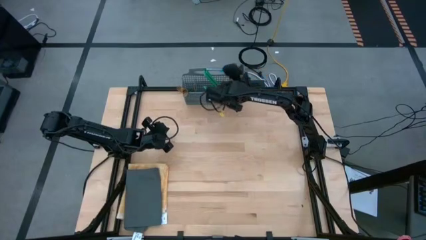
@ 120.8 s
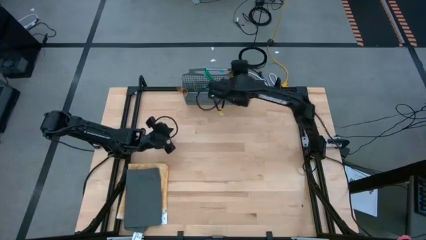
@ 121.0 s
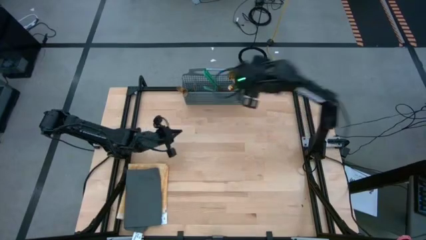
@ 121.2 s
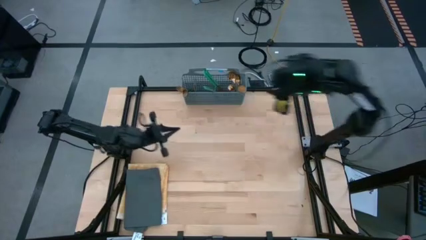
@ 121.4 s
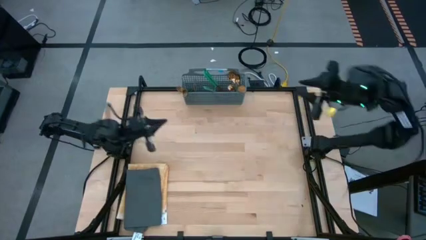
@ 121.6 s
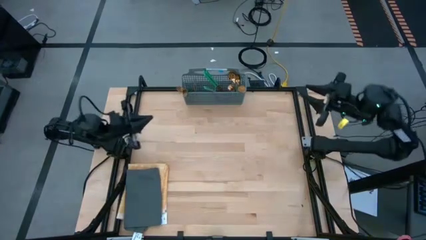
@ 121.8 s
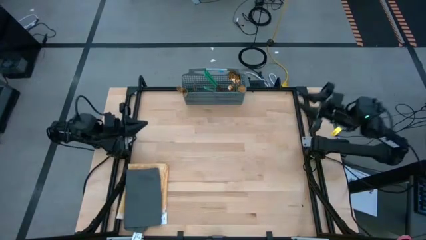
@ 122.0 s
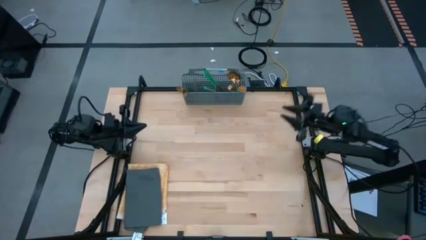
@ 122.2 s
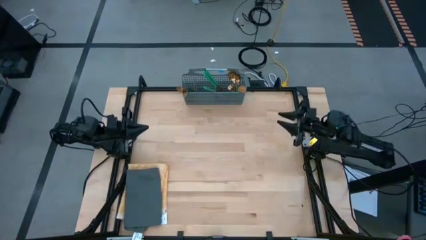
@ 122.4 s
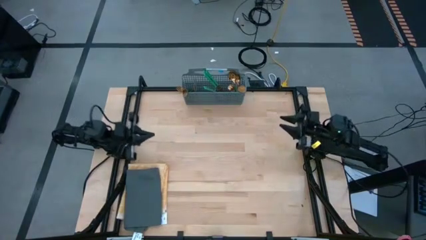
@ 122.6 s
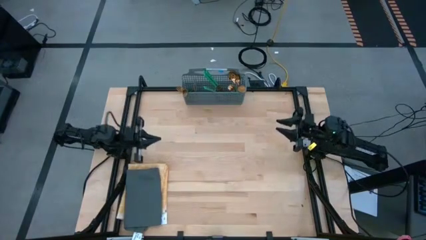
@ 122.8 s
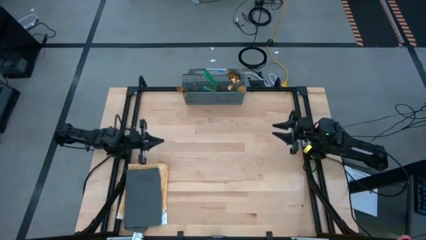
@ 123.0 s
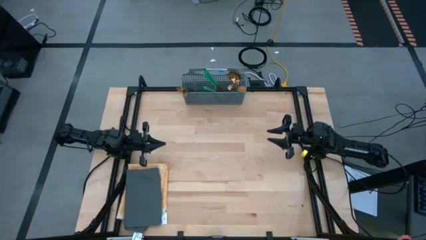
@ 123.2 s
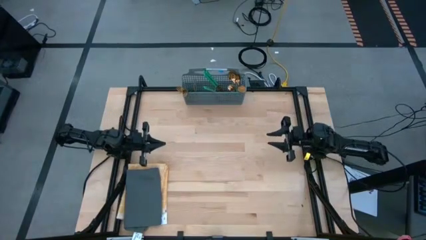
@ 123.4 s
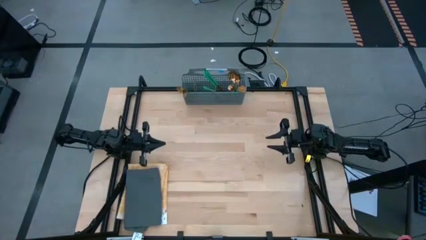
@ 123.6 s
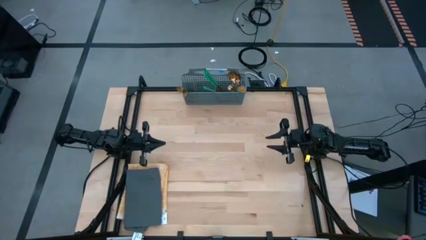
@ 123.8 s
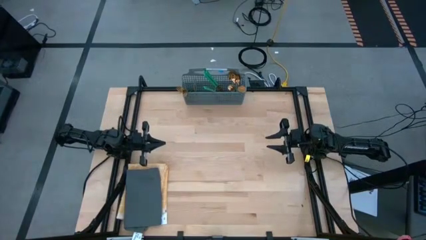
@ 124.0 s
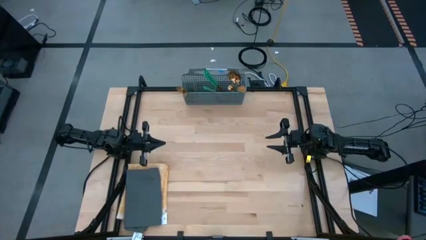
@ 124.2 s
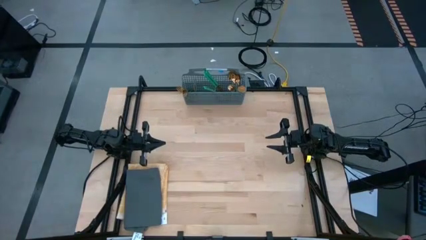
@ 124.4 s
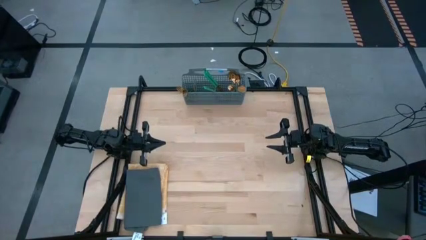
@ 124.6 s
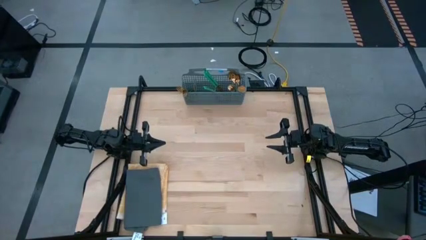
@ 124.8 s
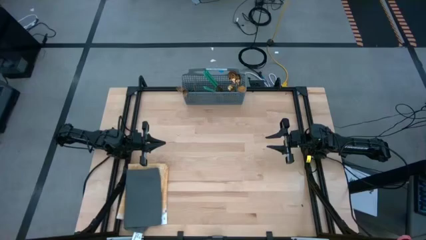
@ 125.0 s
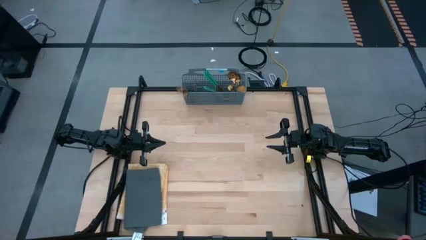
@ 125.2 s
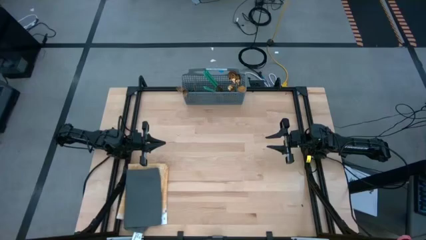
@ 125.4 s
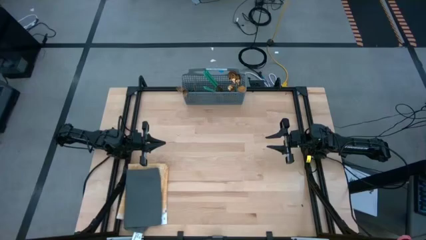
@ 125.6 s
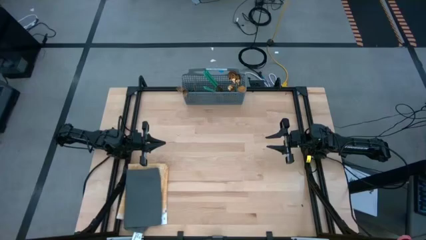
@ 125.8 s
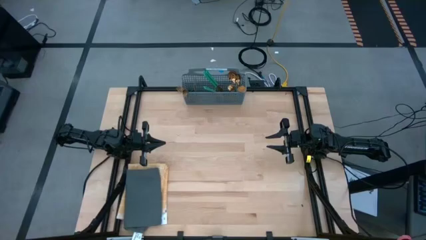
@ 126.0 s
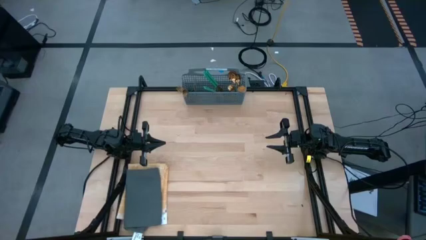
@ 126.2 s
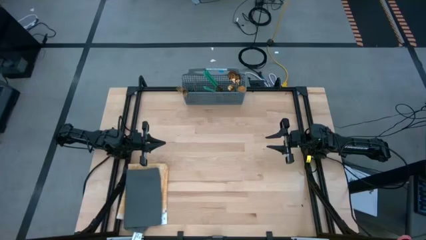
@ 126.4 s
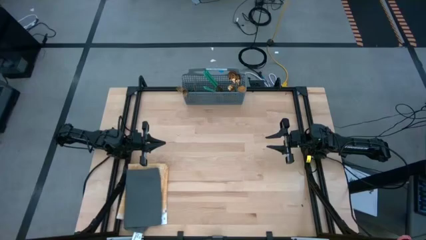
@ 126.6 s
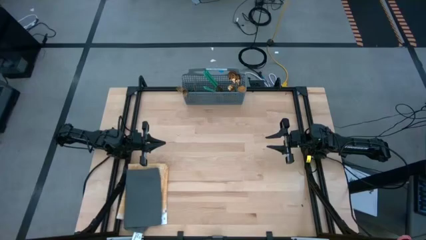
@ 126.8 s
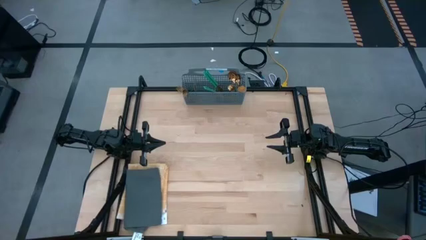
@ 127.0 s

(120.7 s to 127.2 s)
Task: Sort silverware
Return to Home Position

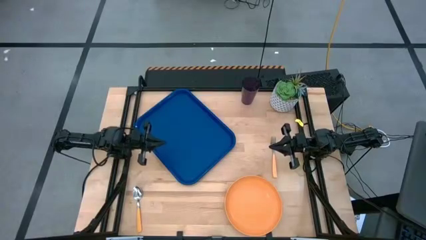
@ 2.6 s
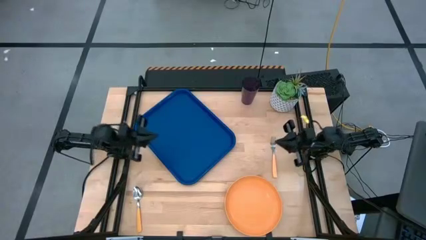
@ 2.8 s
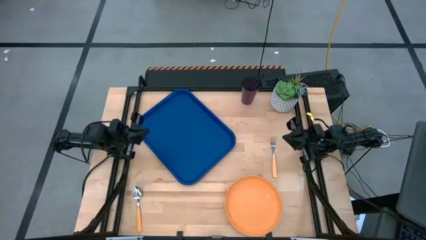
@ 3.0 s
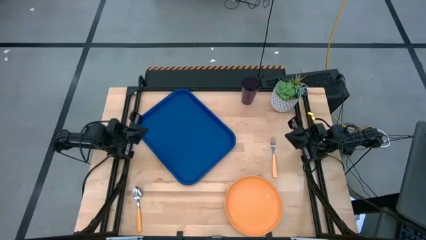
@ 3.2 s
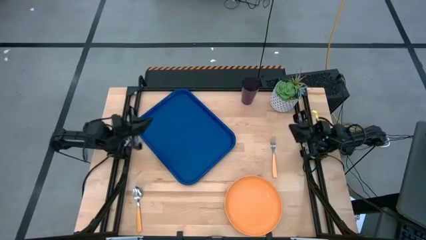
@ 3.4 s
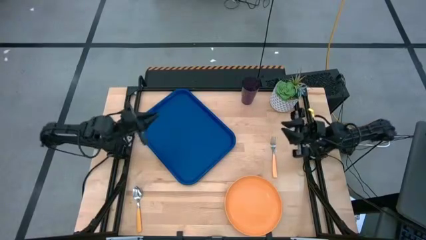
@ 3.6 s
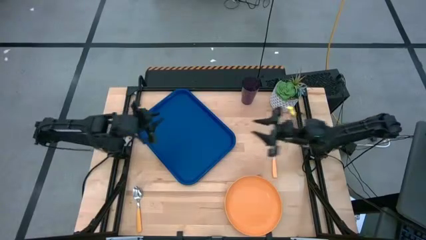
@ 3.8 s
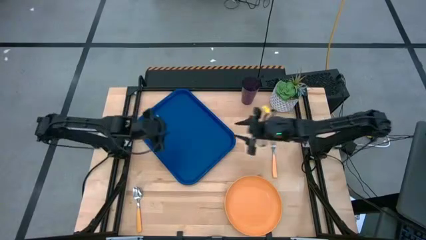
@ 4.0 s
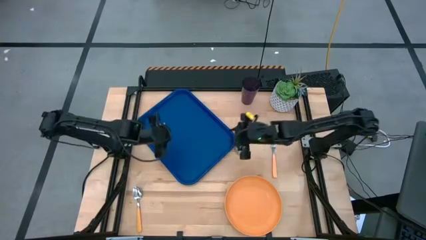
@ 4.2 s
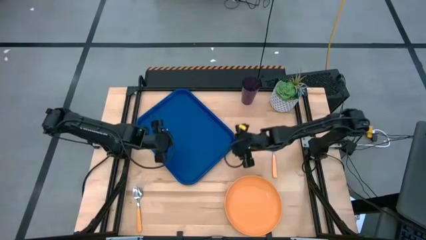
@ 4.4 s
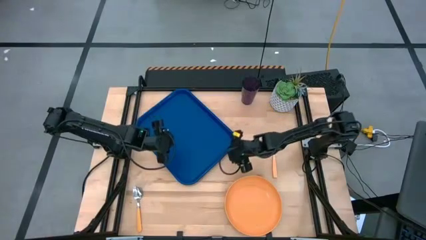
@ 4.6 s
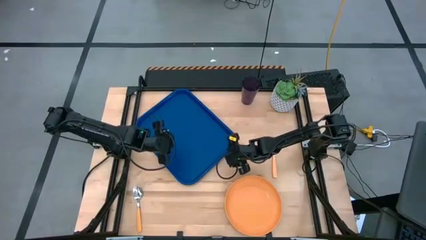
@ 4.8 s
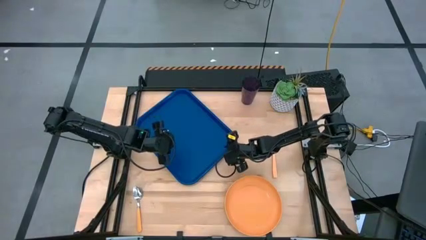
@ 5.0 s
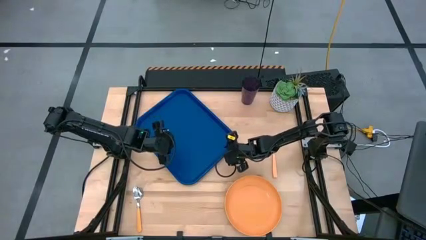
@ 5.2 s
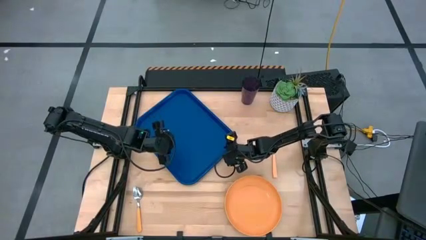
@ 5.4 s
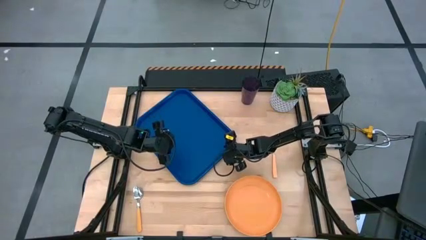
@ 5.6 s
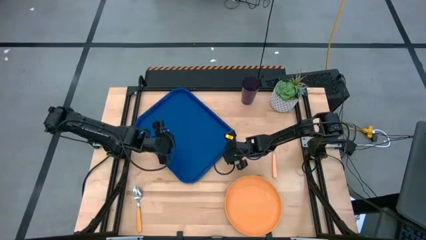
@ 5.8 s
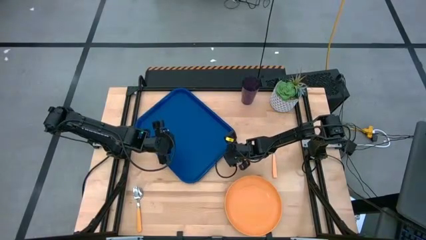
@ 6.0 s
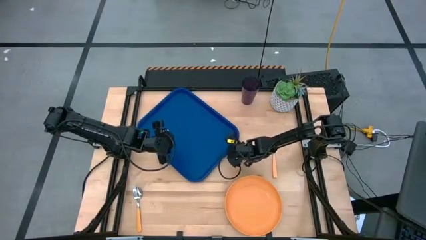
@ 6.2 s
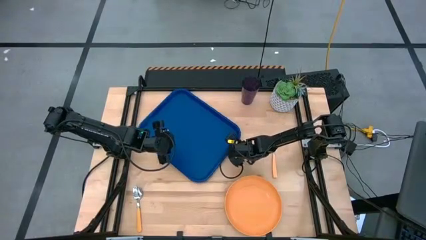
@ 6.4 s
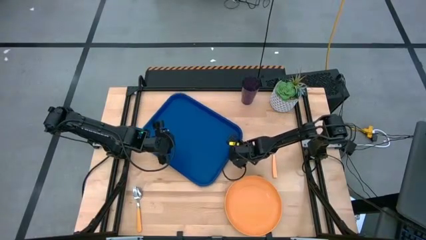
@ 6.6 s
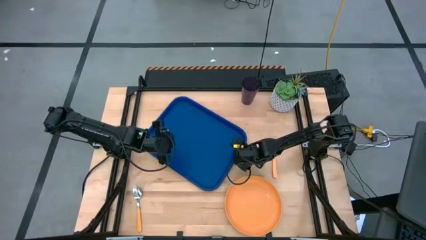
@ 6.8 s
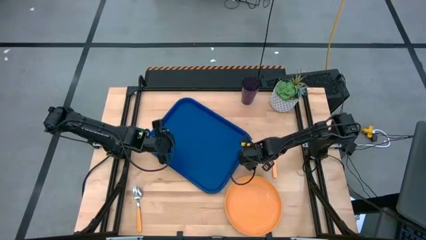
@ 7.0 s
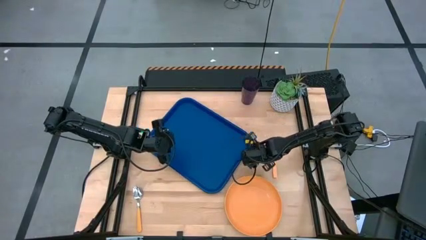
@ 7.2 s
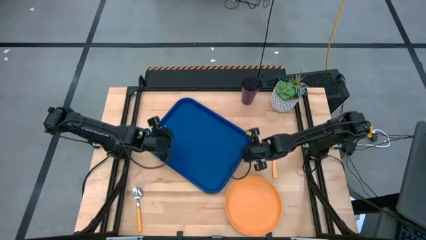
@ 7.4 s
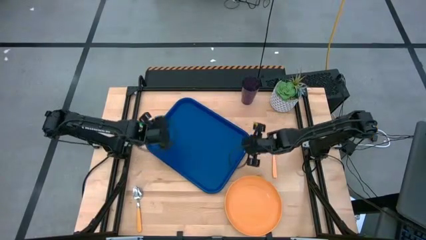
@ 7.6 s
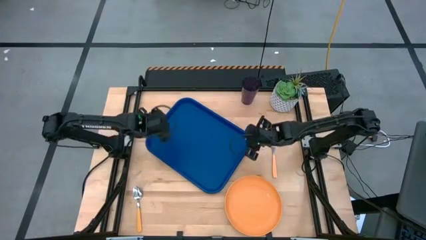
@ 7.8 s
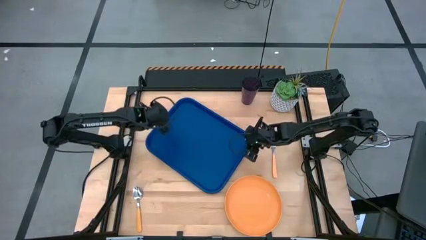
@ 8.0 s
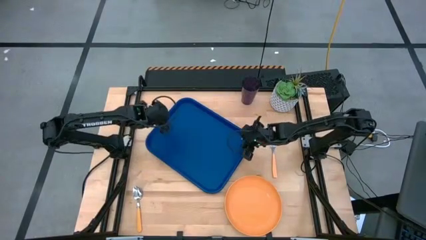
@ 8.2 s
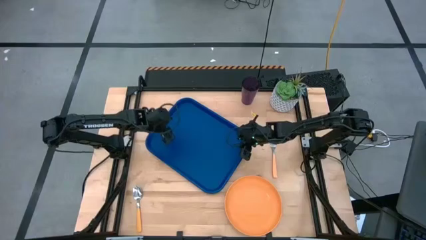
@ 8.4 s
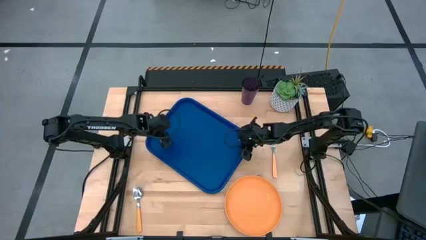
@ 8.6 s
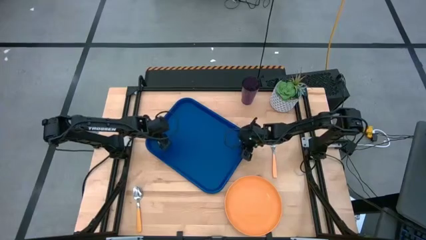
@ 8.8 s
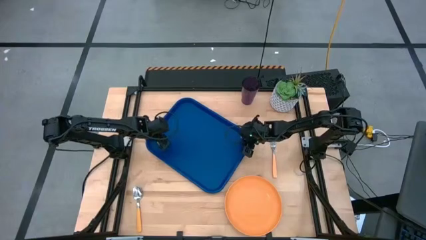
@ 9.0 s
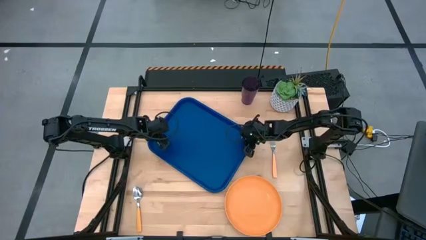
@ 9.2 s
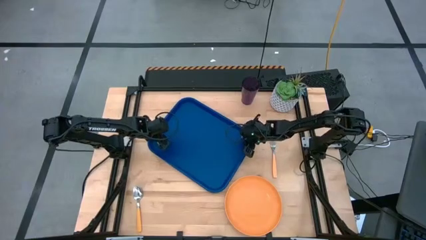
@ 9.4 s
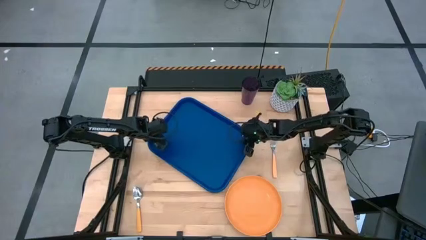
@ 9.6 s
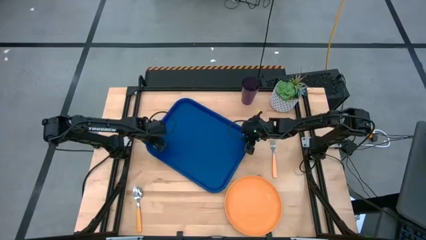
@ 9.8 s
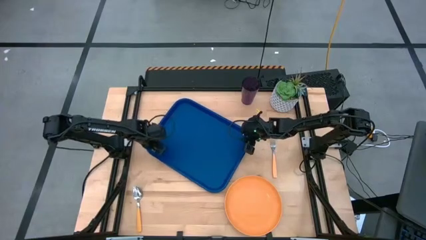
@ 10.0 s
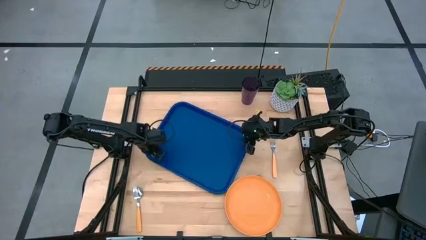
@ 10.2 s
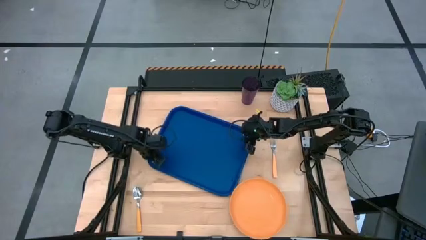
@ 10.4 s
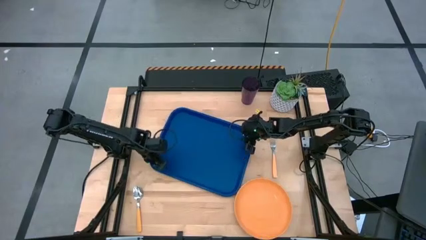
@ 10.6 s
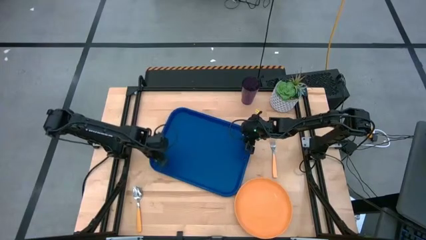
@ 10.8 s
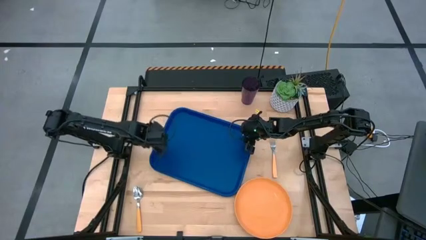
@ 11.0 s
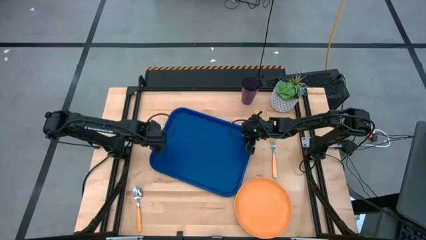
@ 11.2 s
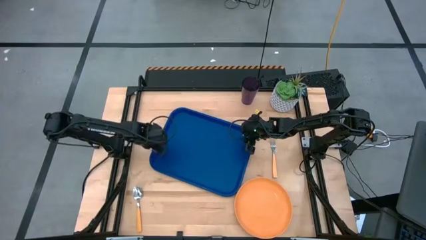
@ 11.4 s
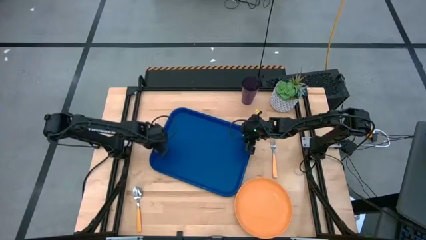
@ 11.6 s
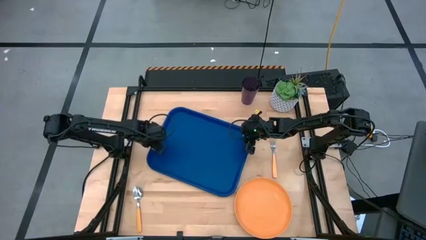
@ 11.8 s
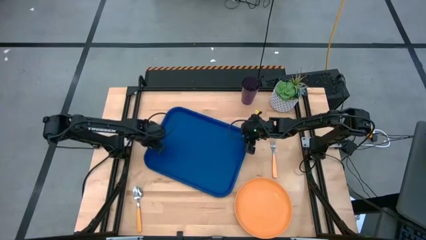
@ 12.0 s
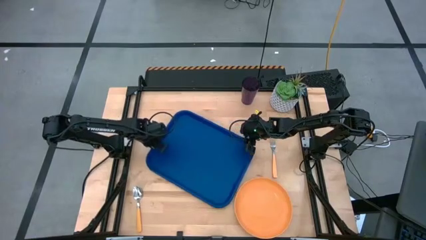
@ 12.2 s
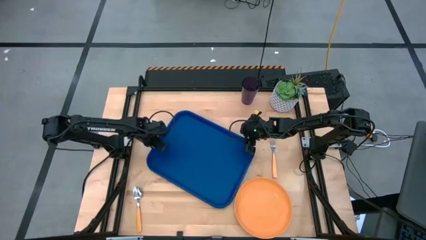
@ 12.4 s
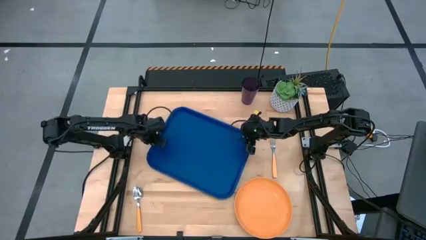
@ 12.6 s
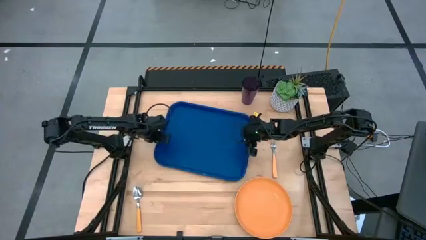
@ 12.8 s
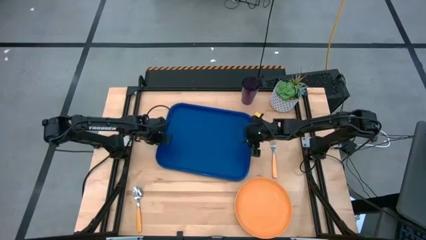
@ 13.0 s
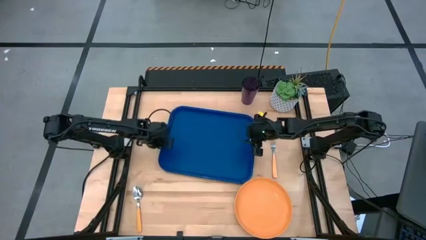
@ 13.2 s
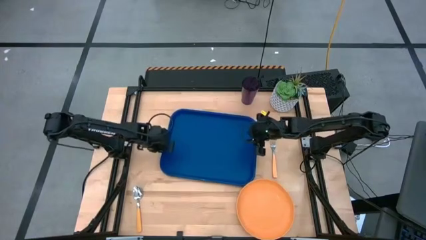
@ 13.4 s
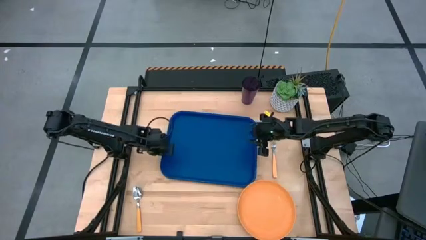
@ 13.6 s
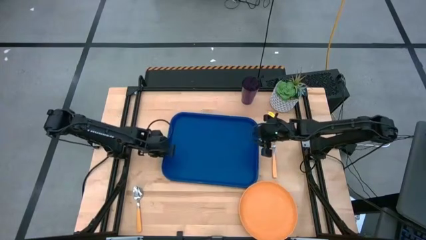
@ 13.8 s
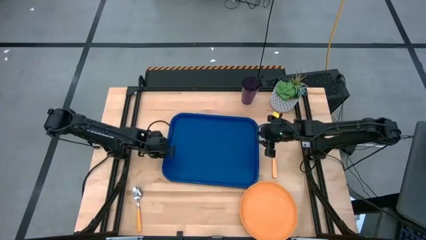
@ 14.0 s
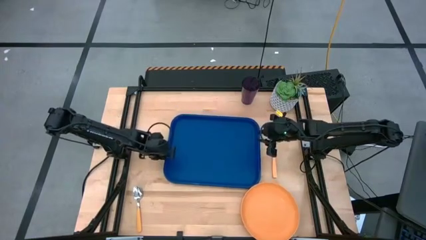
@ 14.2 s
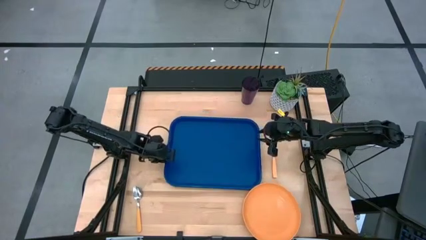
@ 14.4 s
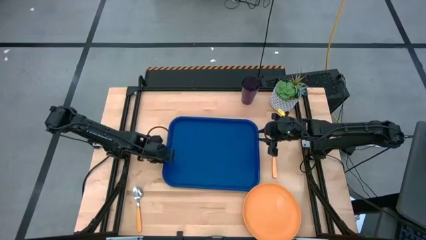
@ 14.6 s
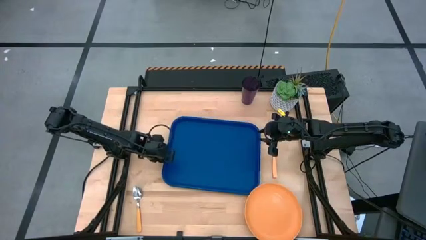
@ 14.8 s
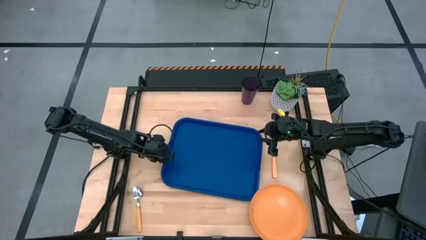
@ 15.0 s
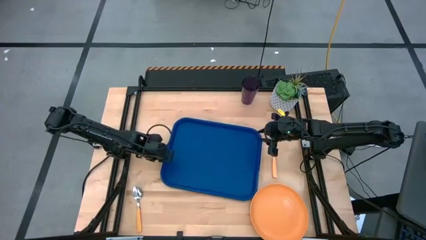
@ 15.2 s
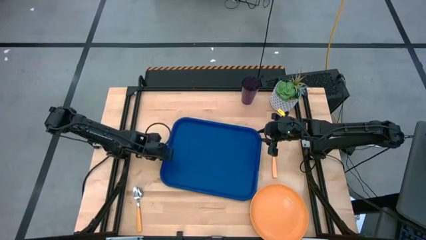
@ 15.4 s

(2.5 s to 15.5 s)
Task: Pick and place plate/cup/fork/spoon on tray
Prepare the blue serving tray
